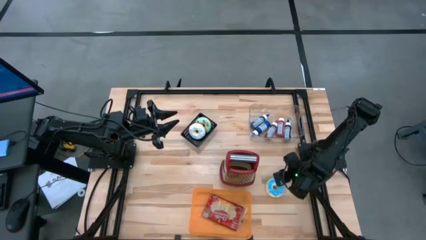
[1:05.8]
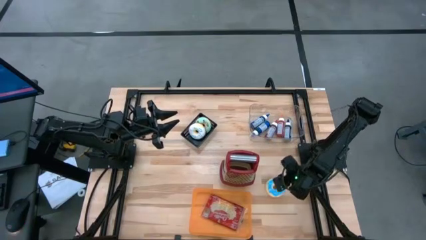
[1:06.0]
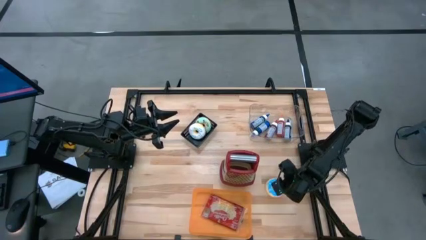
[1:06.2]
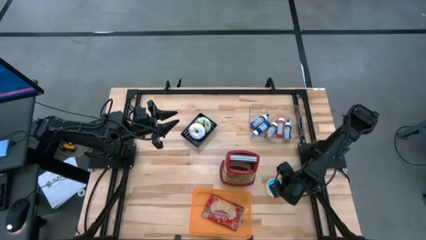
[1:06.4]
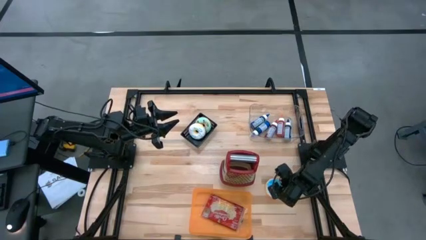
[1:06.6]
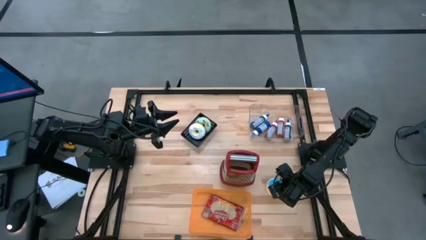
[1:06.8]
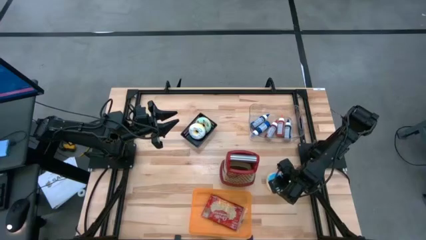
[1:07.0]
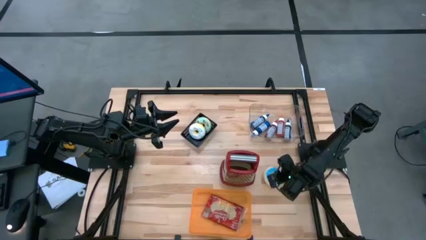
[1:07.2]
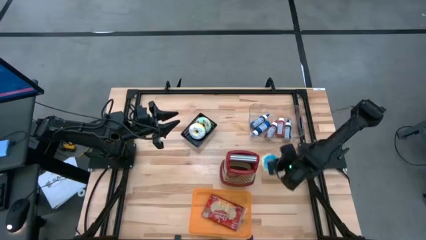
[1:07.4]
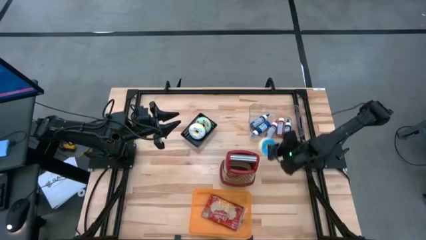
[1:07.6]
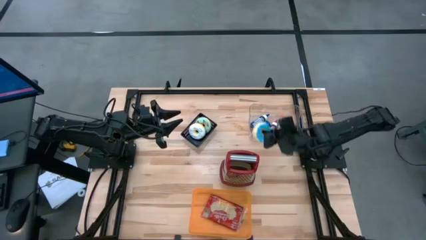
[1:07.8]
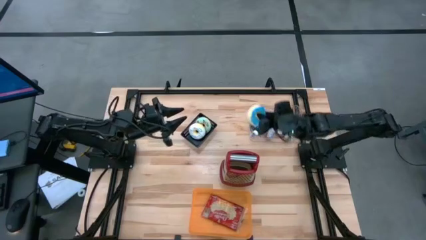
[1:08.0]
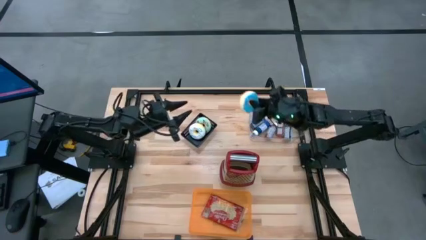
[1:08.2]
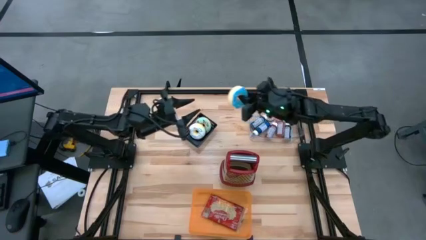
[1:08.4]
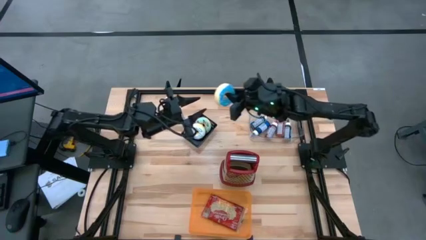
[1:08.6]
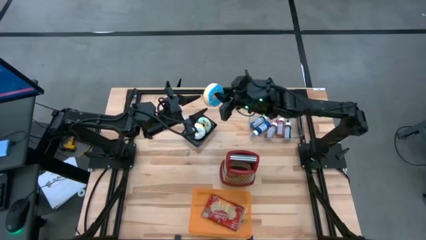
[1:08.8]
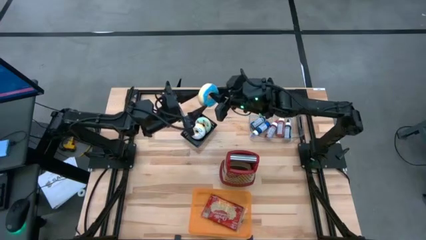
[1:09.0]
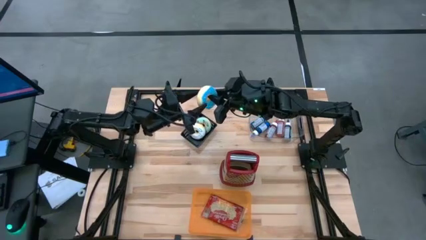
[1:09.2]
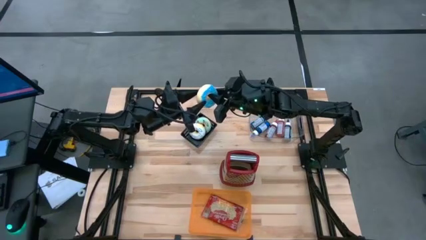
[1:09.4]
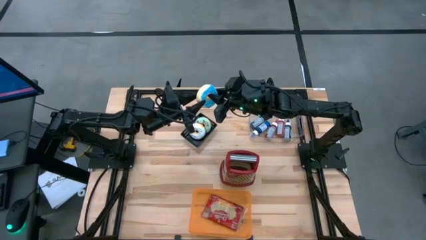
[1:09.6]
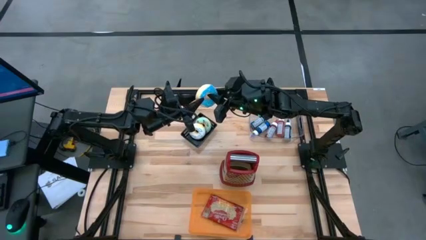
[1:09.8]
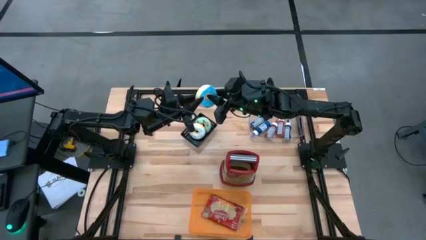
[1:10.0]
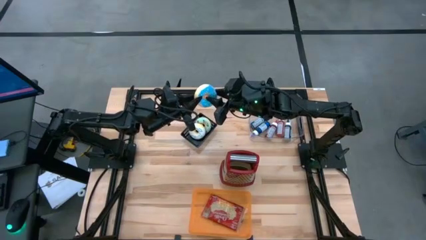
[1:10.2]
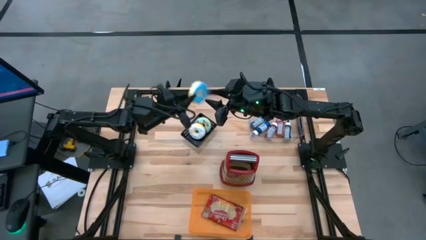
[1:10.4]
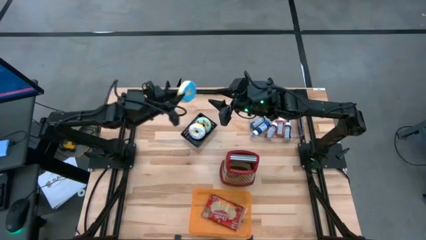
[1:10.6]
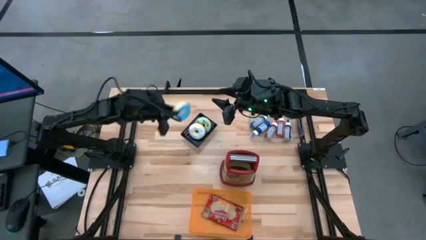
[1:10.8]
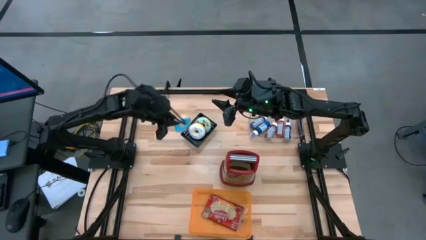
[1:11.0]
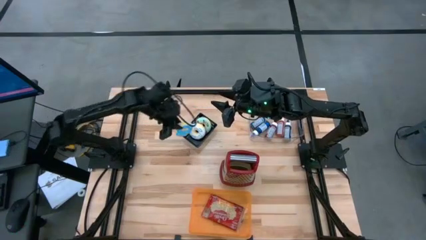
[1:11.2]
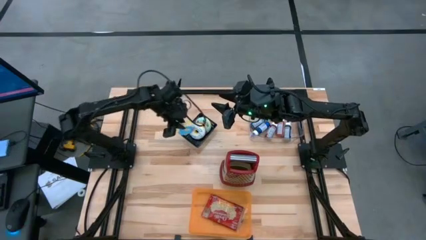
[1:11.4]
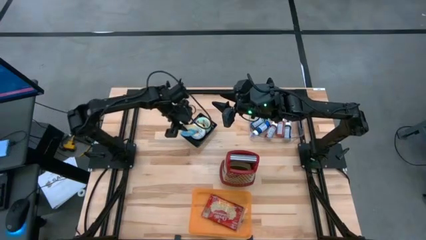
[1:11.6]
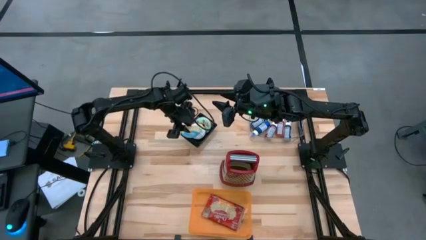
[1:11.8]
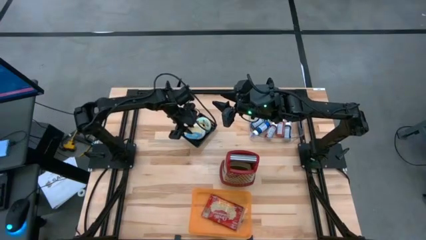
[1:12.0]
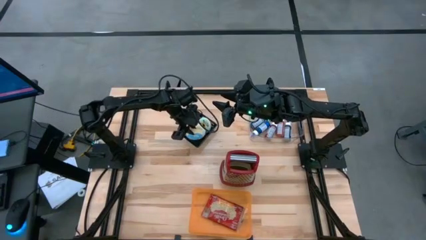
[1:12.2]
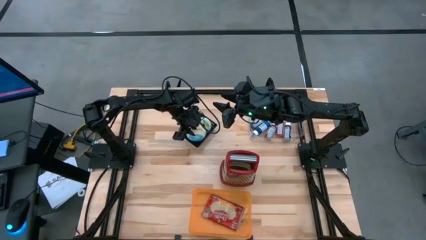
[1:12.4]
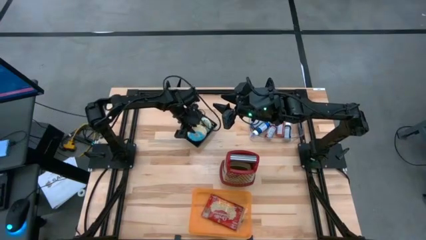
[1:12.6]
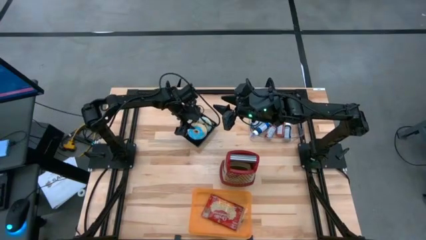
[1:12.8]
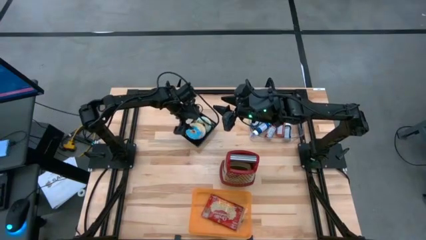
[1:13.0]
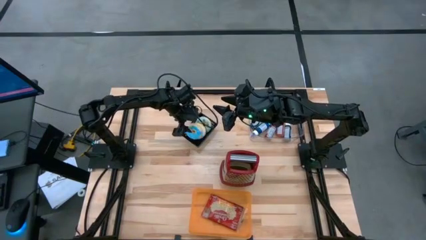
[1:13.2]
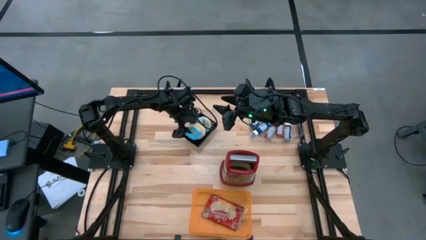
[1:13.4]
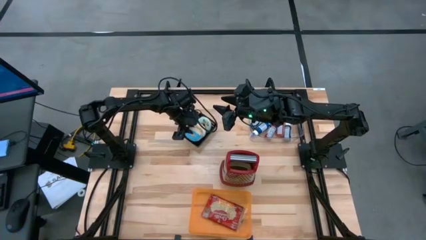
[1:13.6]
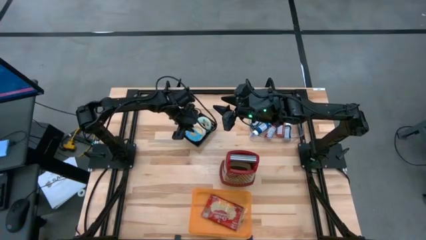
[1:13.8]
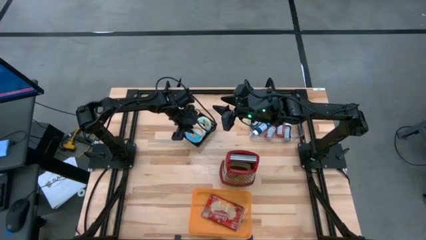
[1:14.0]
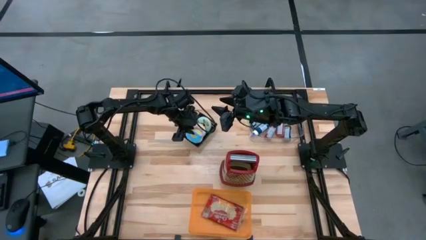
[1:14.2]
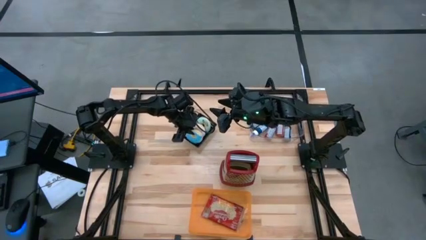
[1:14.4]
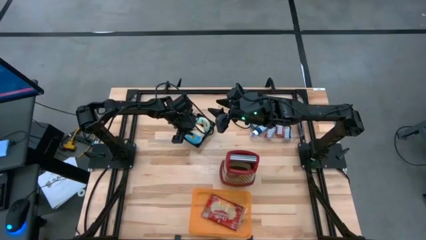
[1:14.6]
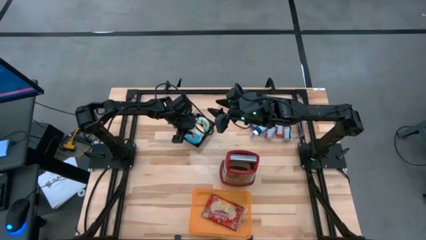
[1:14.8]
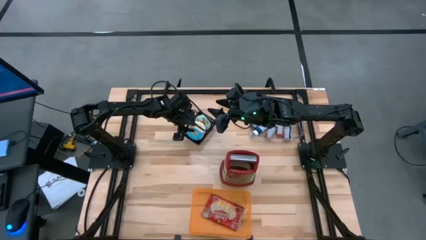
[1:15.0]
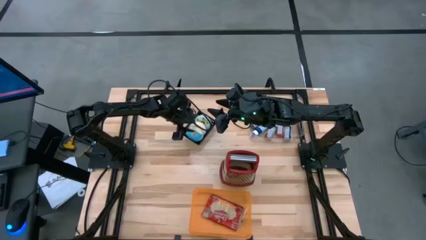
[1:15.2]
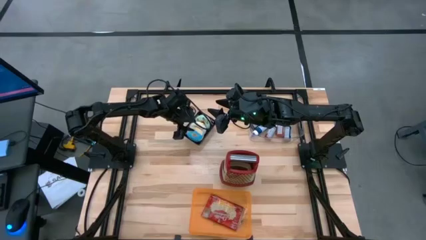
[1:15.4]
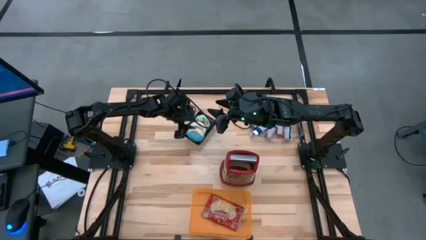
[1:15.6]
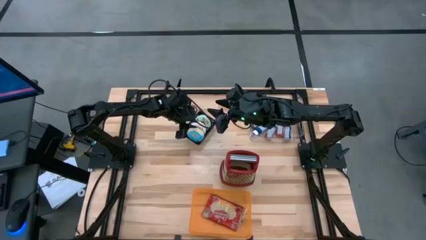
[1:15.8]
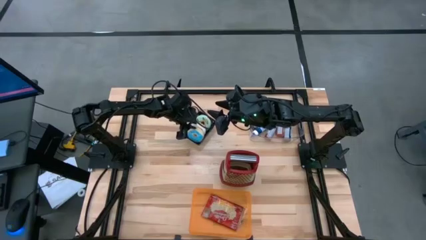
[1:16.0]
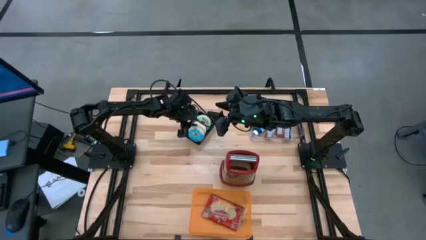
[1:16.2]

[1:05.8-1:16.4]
Put the blue donut into the black bin
